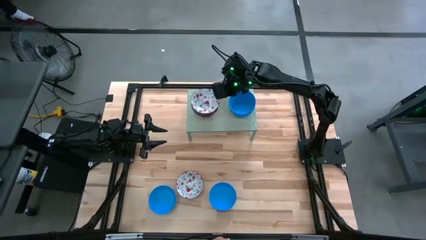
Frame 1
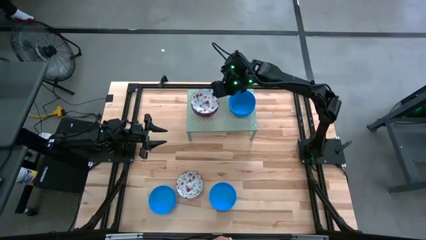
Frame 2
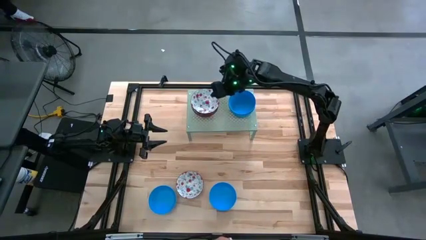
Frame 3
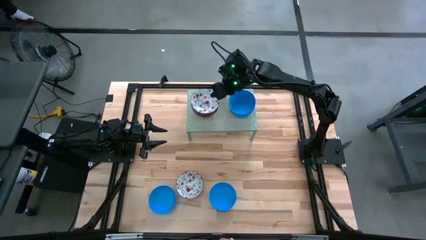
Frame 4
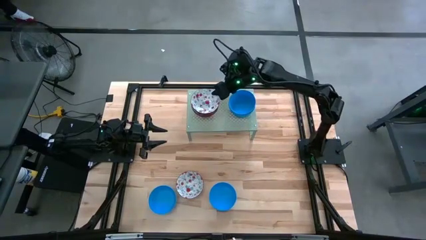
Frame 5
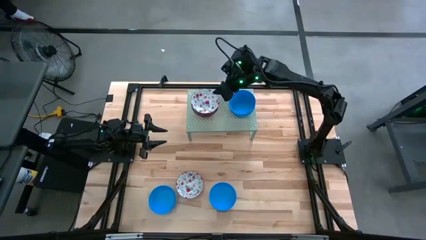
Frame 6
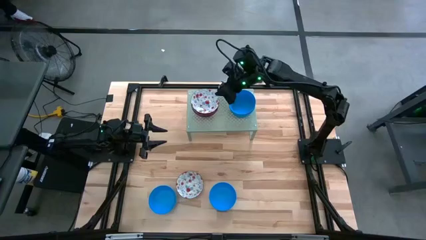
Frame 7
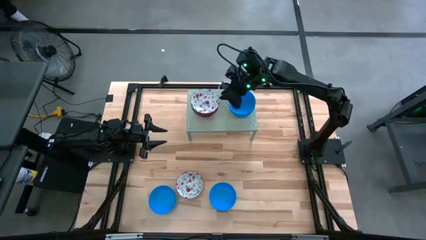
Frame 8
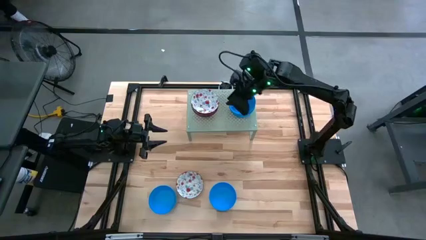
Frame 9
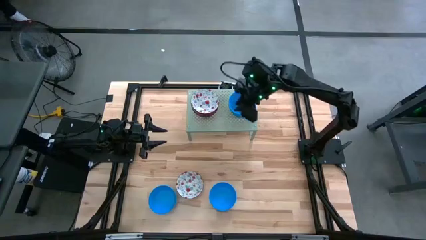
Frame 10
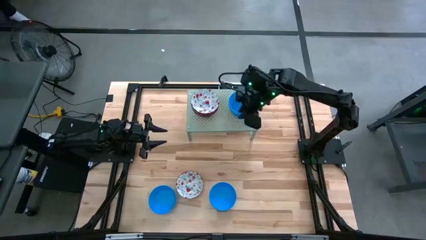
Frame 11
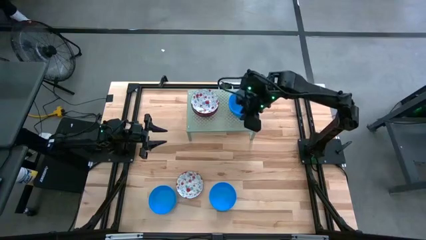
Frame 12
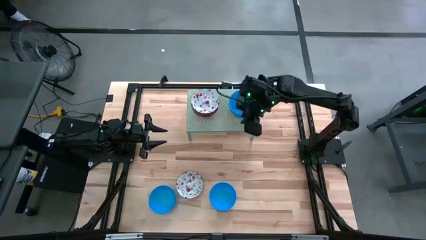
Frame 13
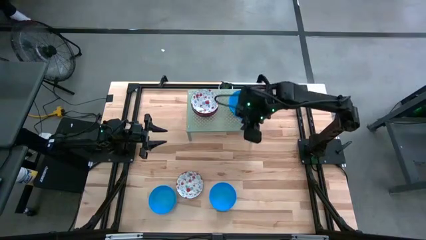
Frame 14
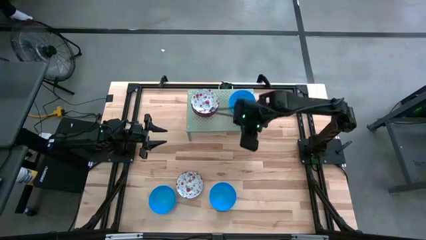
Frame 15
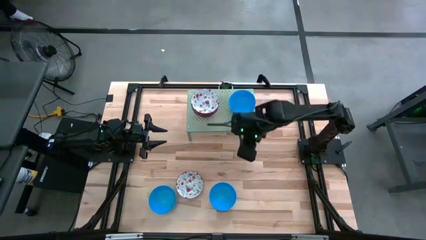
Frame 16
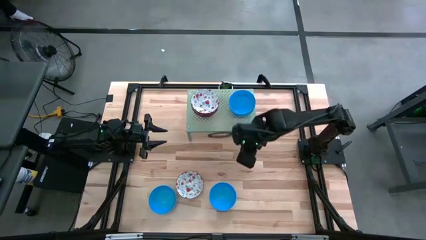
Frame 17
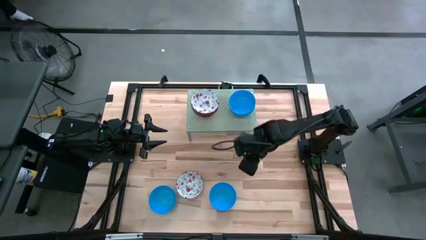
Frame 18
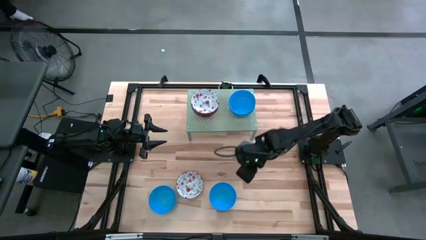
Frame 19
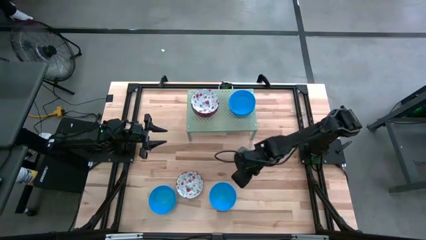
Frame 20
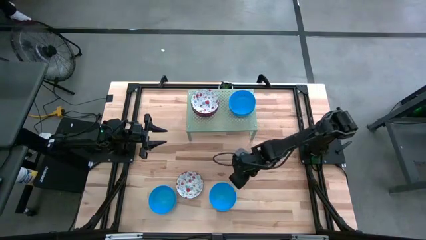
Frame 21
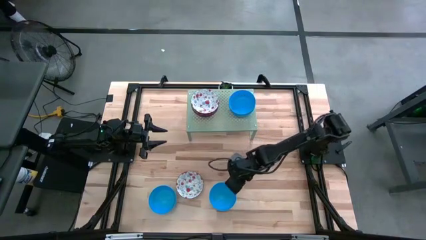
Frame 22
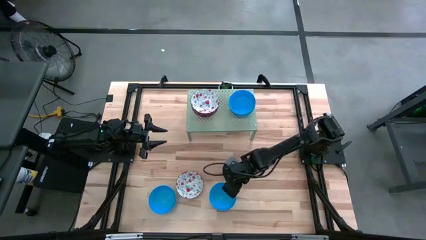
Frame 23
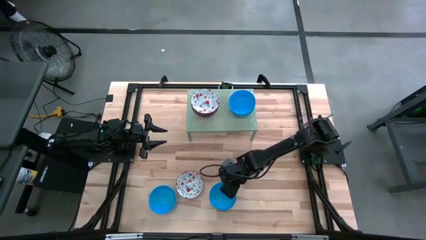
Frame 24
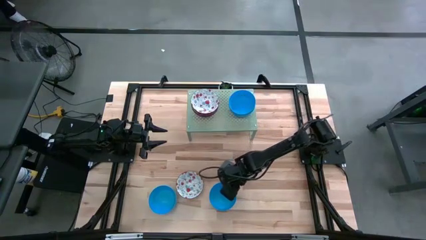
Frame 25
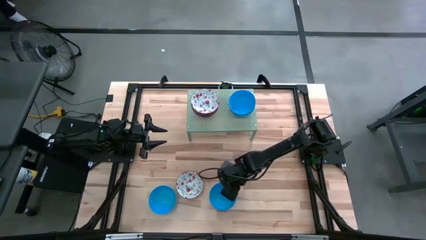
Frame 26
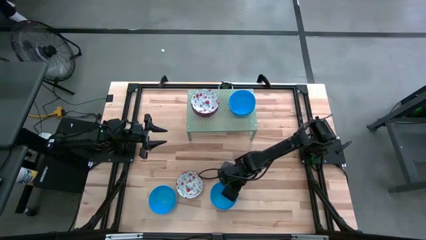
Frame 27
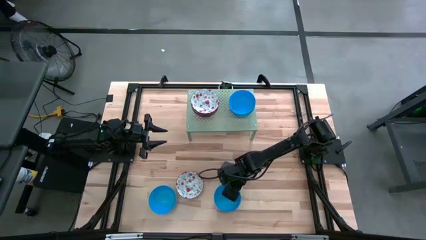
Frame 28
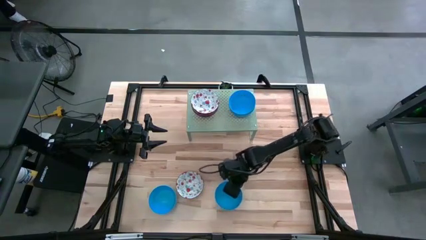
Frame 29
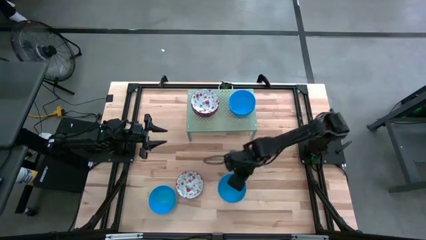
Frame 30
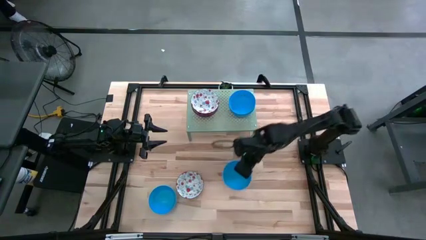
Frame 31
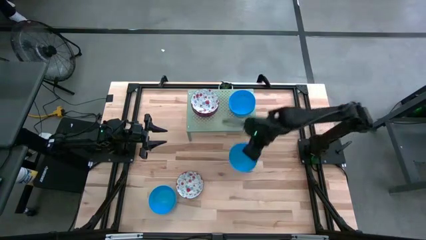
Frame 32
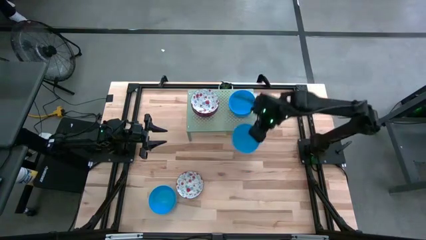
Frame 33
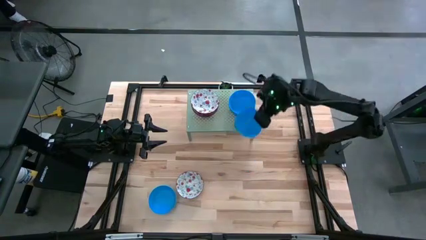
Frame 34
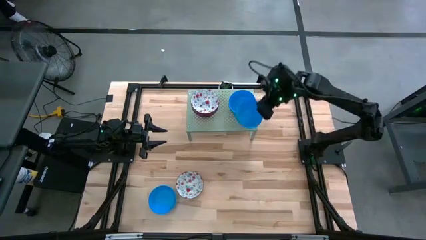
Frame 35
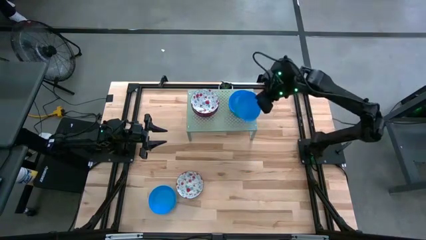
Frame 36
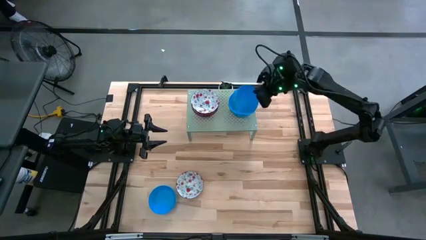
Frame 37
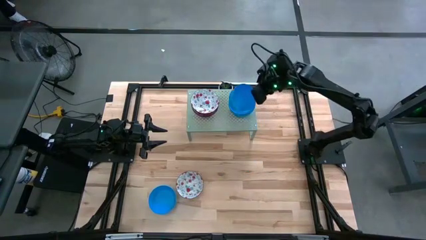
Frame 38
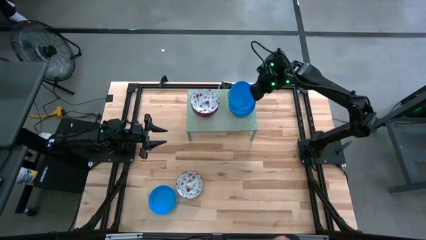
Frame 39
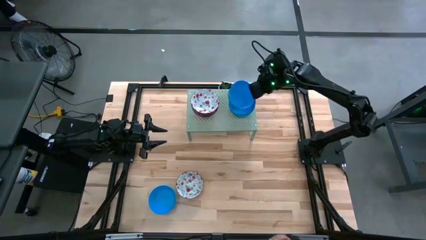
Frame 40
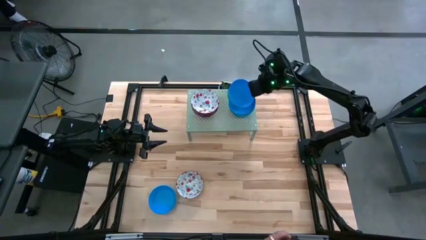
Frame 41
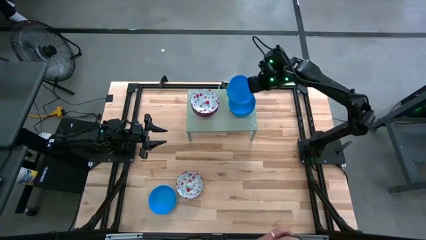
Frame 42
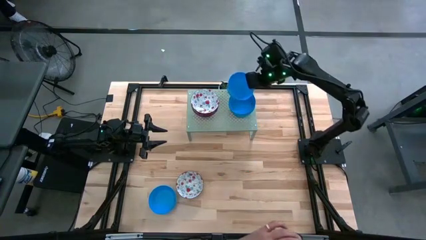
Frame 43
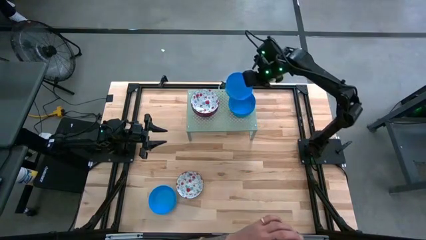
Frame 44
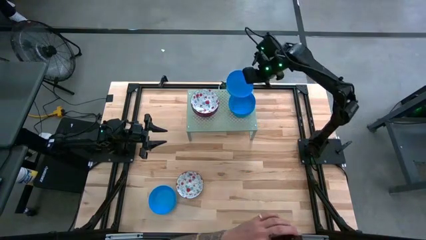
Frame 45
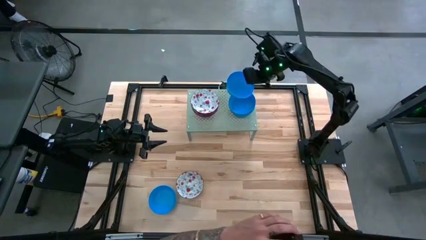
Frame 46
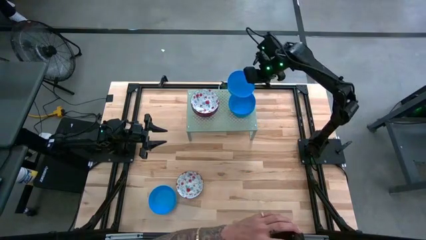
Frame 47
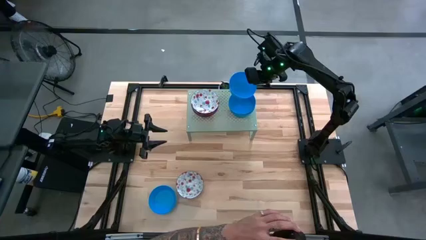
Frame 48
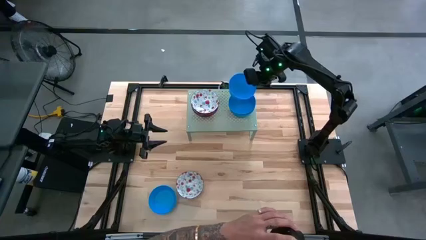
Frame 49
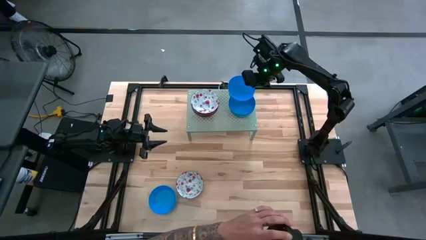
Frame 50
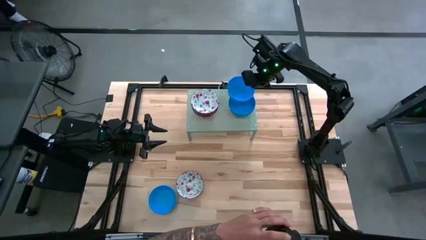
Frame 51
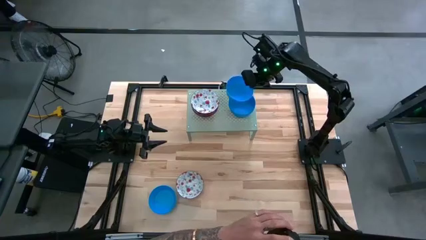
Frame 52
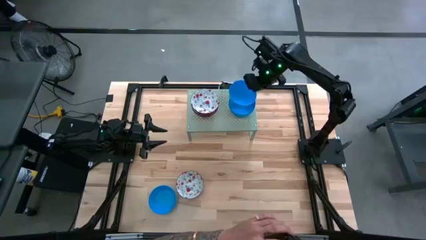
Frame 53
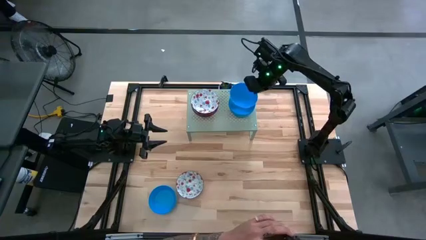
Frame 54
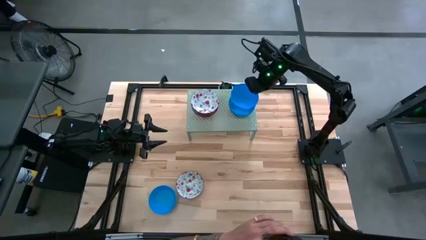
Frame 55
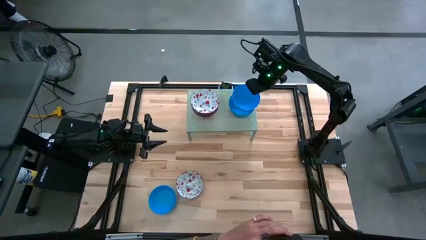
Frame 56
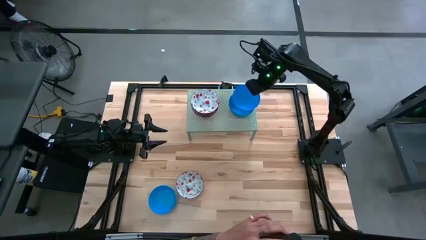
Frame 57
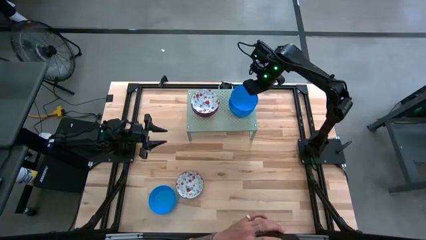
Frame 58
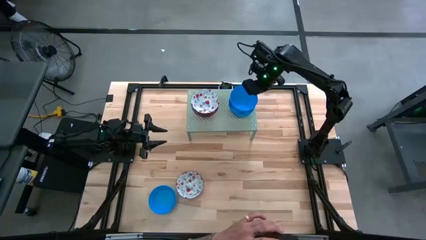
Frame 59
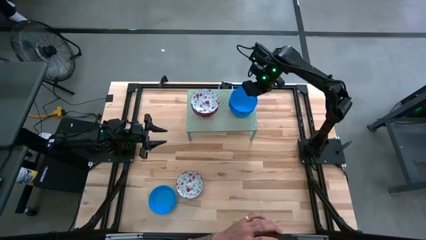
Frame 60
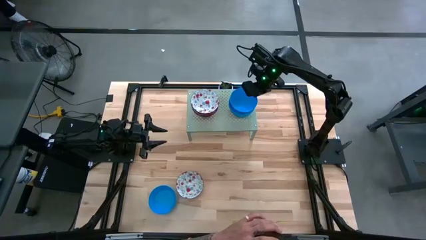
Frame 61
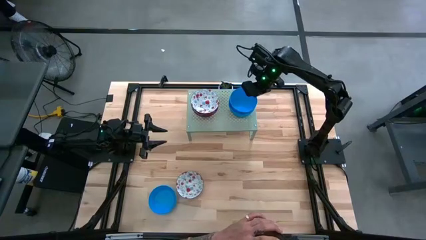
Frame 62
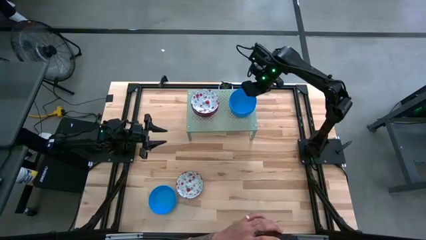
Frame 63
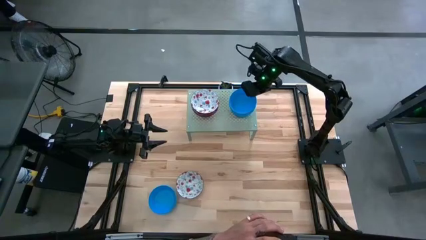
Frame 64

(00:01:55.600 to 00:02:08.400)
Task: Pick & Place Mini bowls
Stack the blue bowl on the blue bowl on the shelf

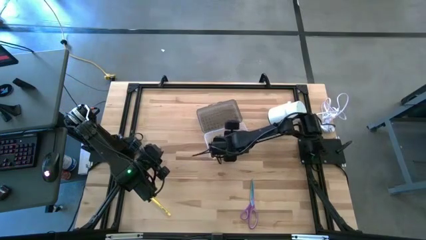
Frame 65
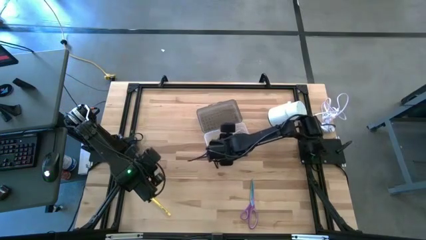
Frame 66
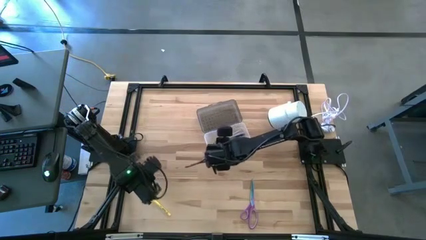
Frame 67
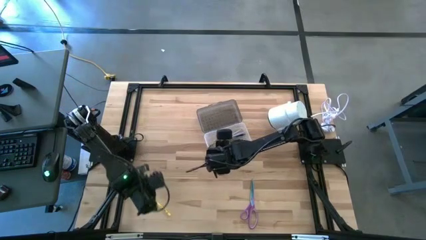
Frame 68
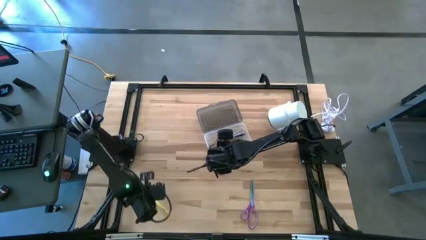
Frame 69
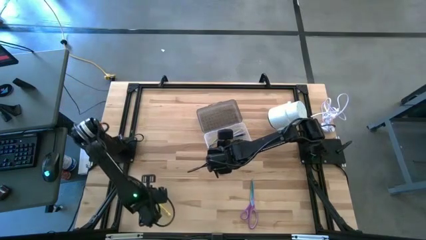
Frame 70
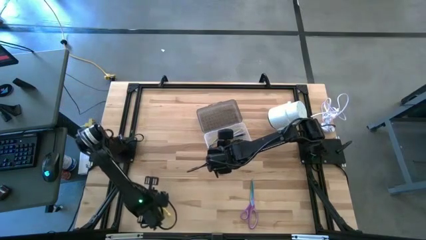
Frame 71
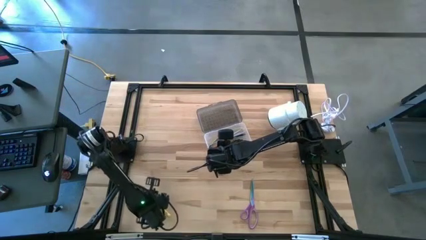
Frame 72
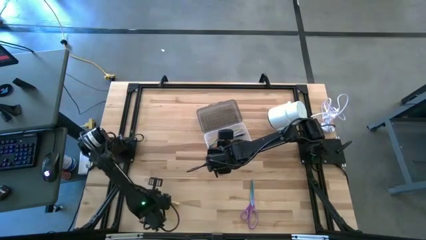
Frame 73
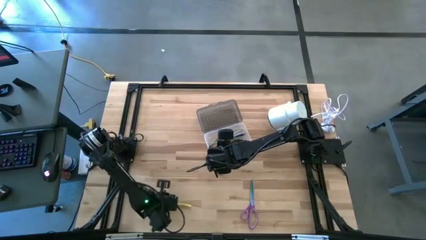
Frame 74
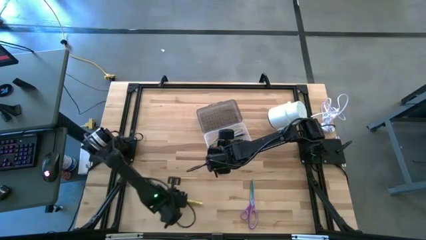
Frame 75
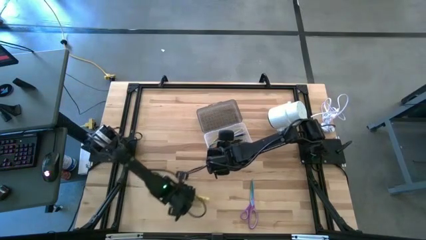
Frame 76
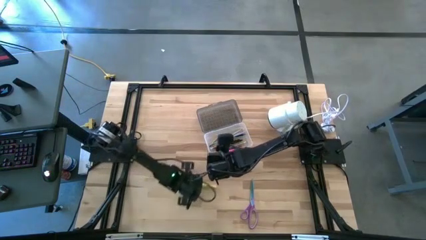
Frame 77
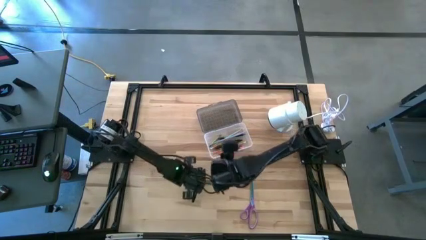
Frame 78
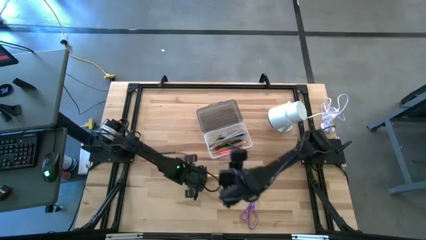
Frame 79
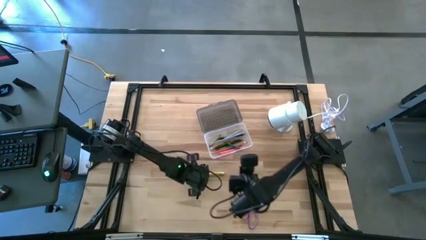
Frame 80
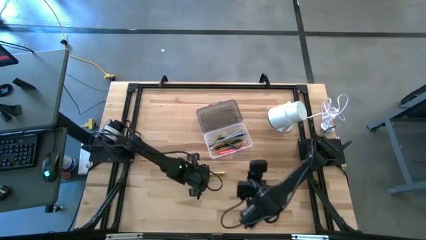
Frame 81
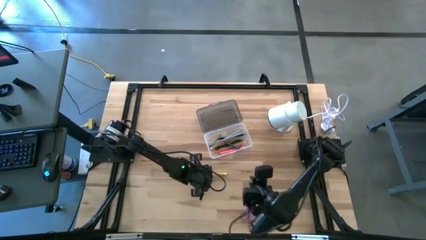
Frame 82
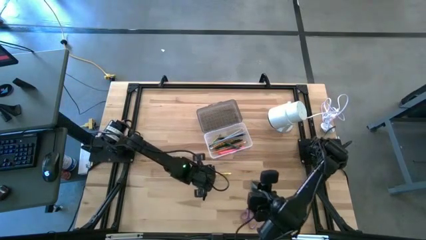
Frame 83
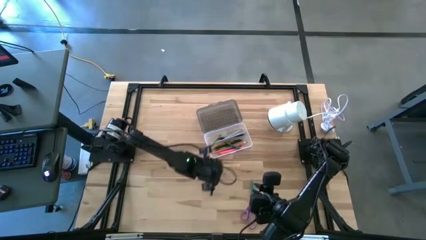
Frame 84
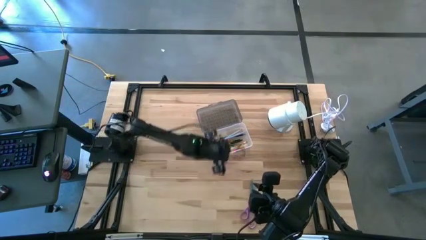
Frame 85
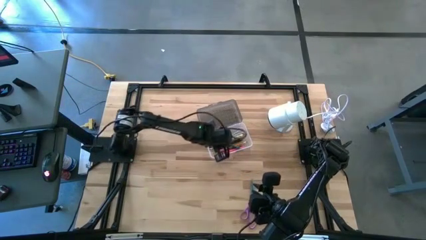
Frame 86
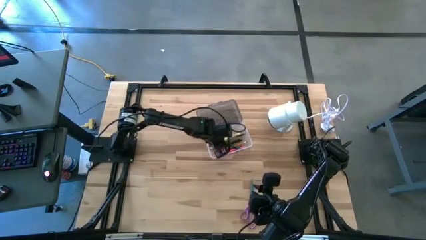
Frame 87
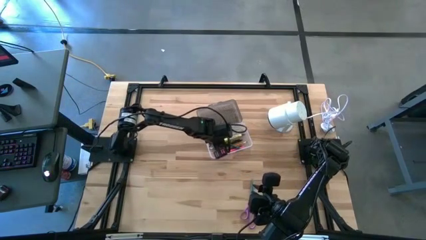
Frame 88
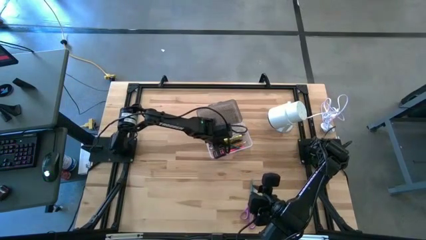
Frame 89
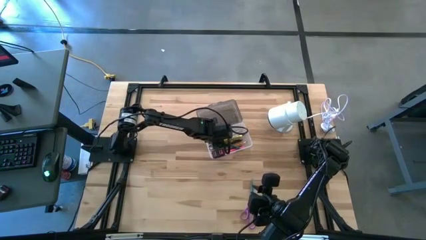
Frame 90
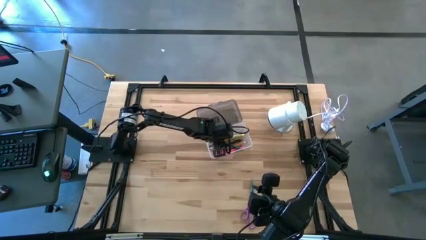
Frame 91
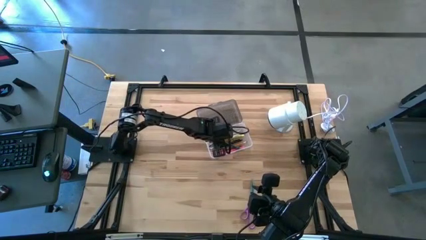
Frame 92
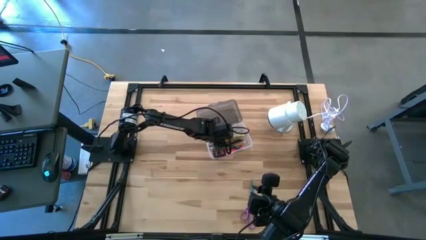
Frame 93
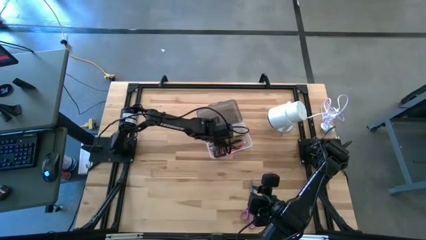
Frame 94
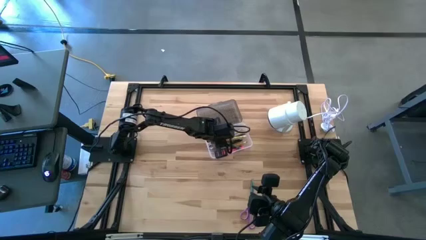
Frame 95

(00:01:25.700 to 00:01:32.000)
Task: Pick & place school supplies into a supply box
Put the yellow pen into the gray supply box
